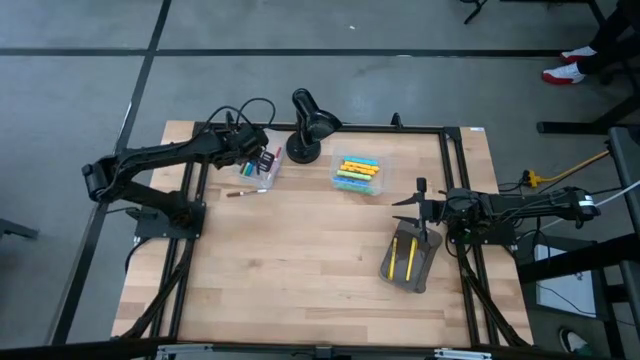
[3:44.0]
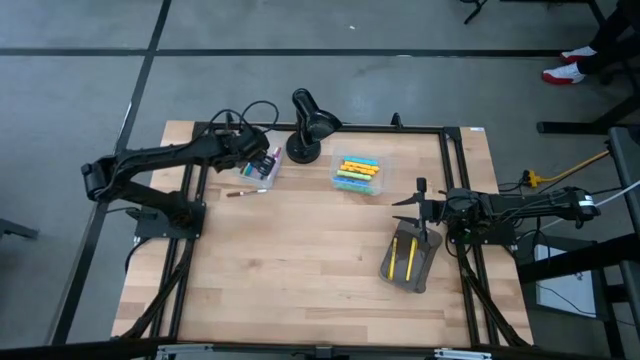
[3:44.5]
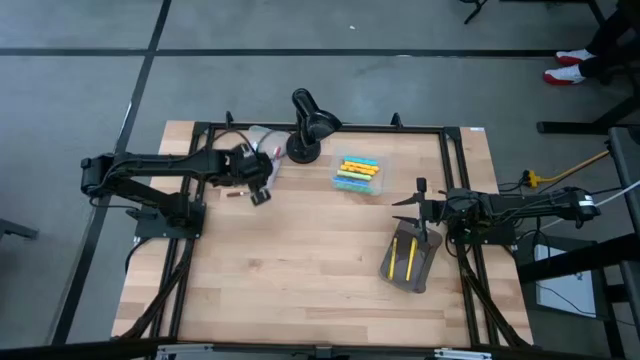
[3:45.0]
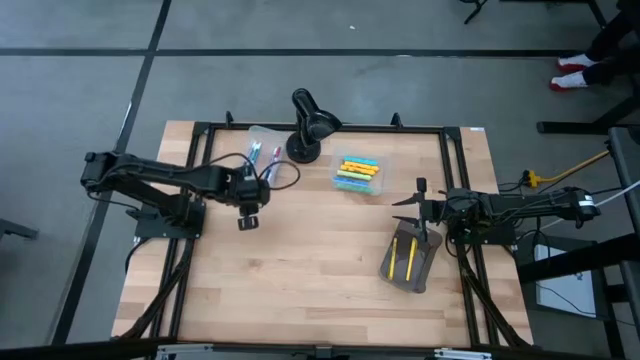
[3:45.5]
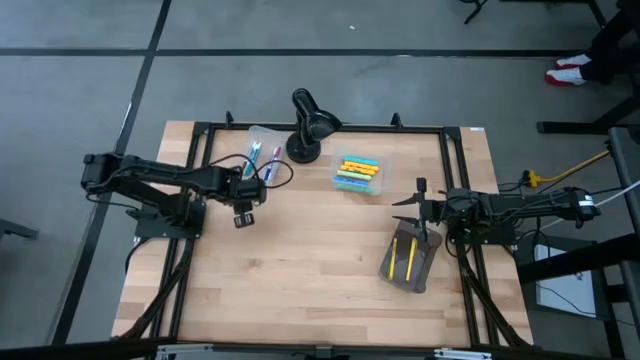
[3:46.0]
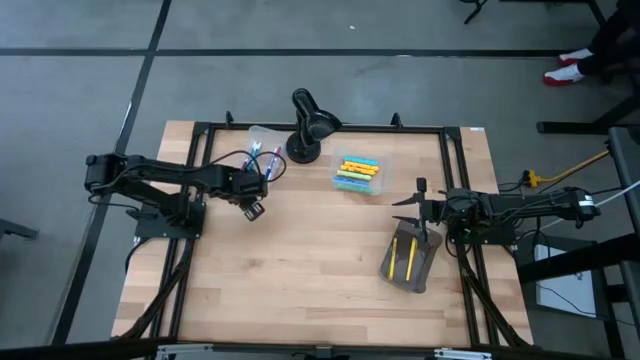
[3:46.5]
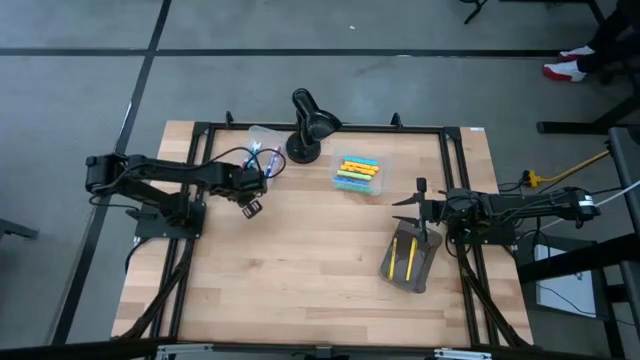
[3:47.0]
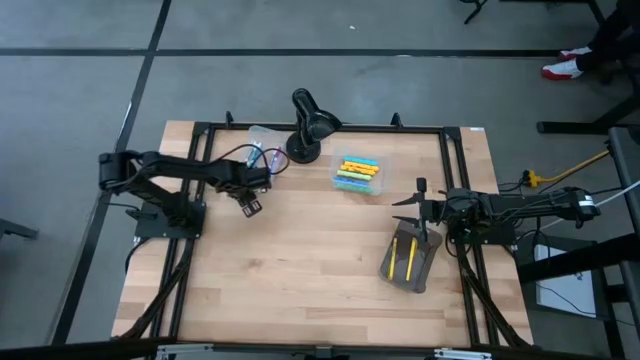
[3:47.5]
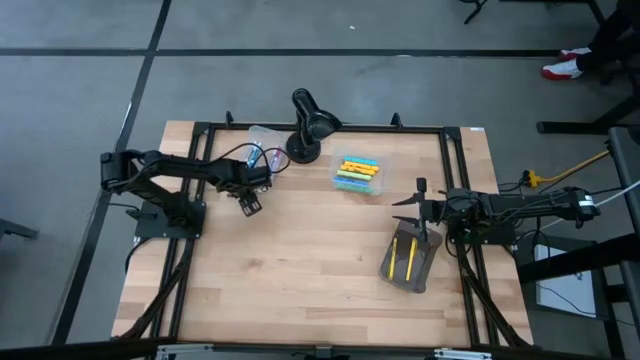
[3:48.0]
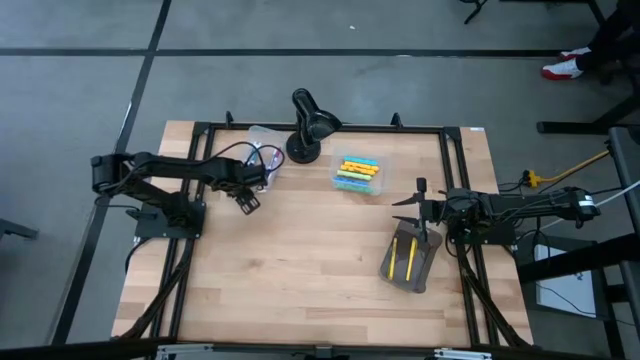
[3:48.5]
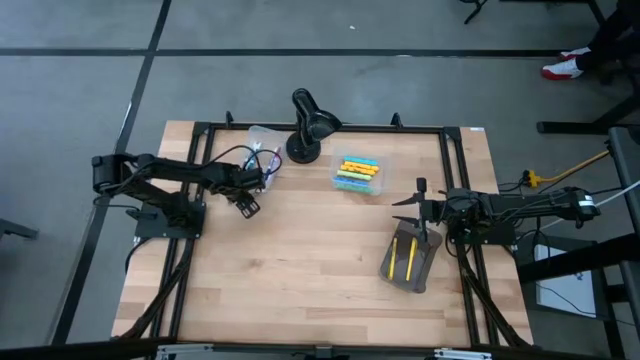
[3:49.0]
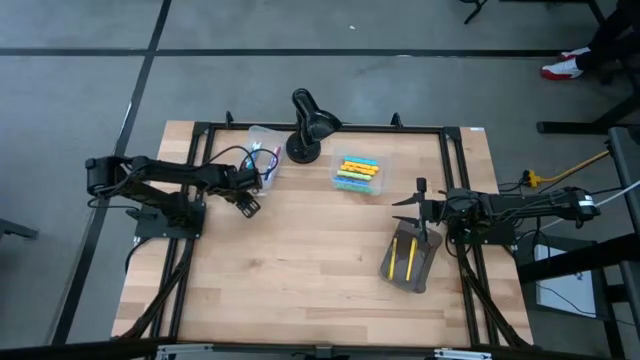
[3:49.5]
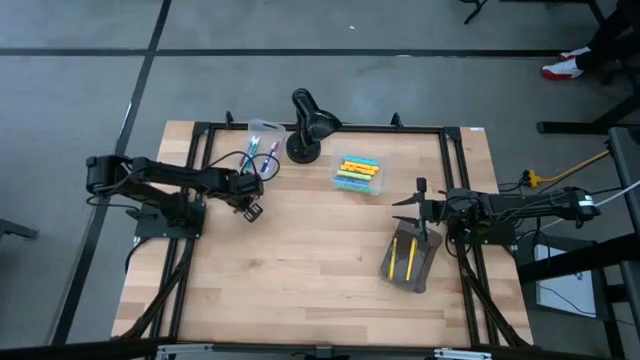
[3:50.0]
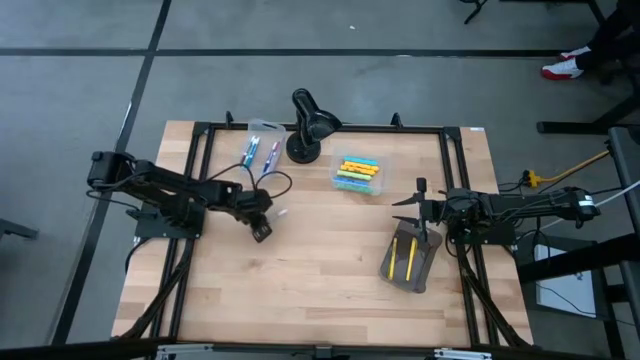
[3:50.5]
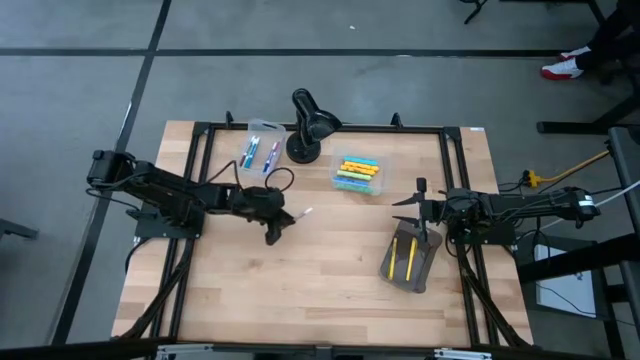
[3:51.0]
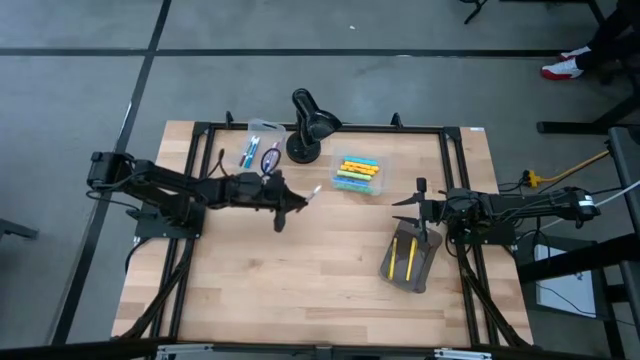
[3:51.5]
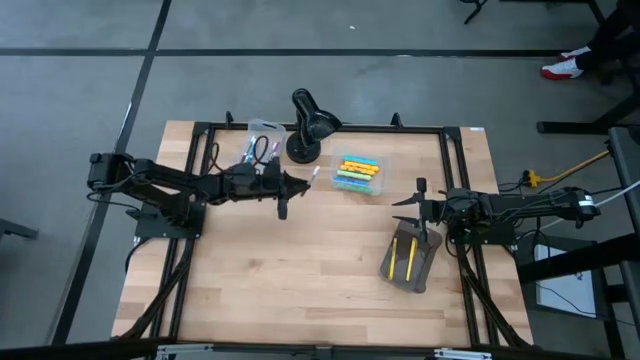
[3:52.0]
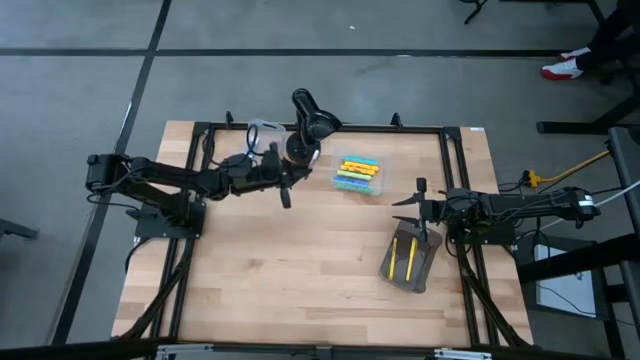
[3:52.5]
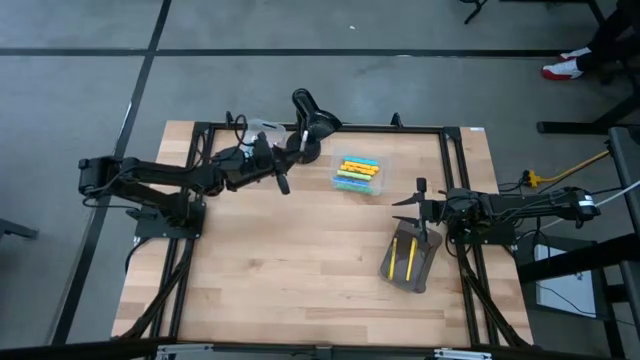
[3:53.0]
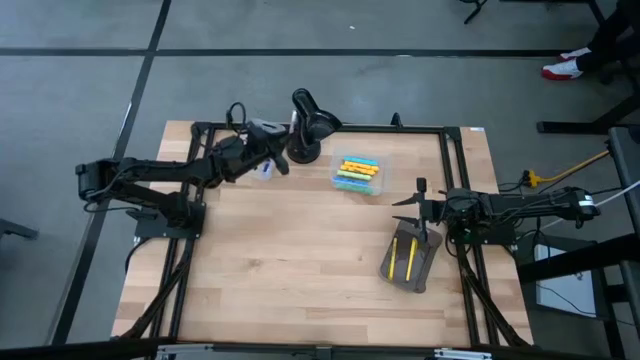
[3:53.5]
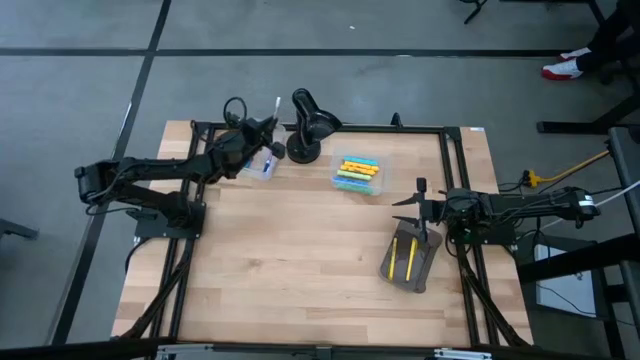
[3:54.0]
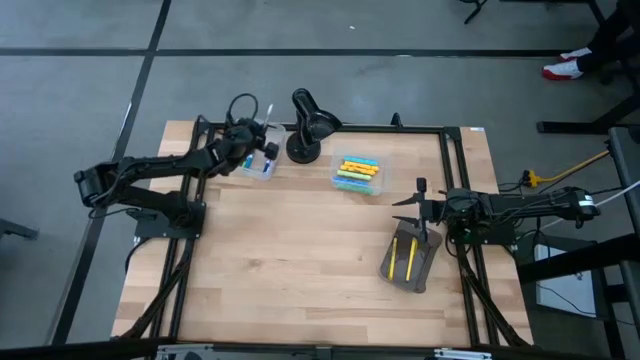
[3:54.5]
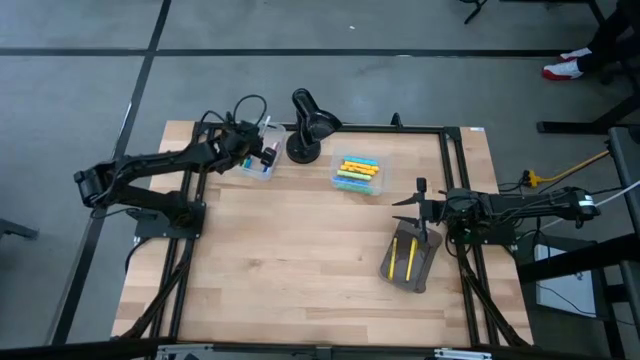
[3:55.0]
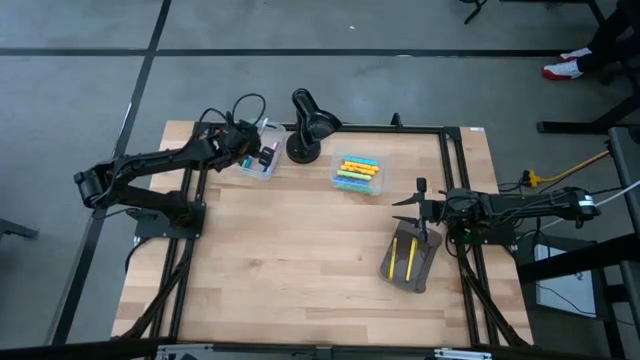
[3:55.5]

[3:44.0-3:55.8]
Task: Pick & Place Markers
Put the brown marker pen into the left transparent bin

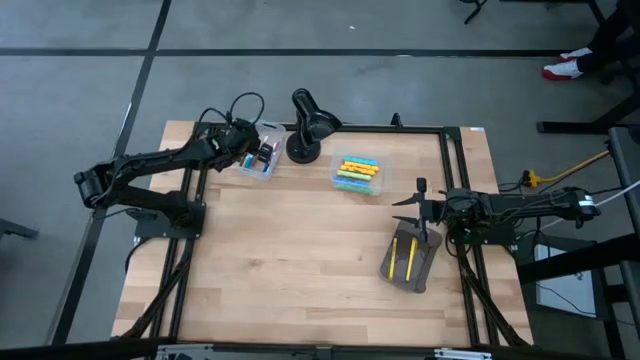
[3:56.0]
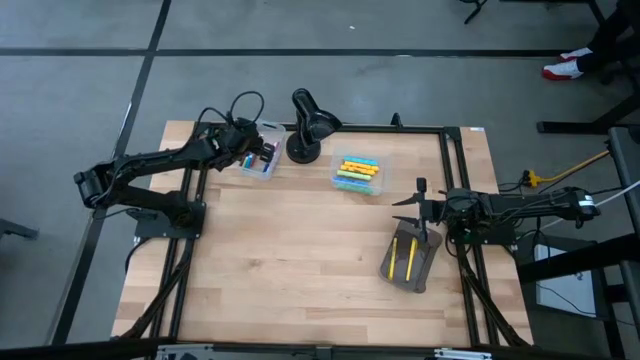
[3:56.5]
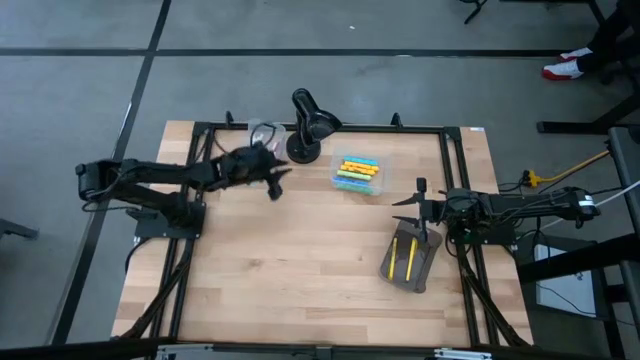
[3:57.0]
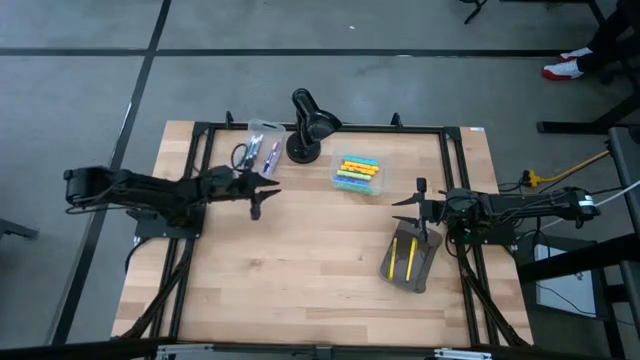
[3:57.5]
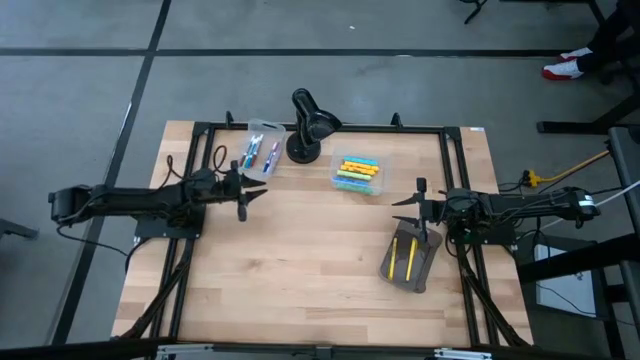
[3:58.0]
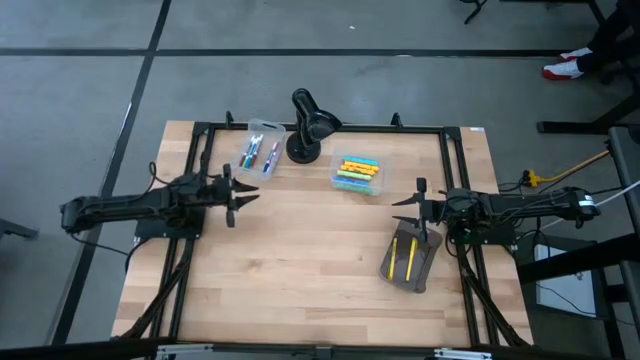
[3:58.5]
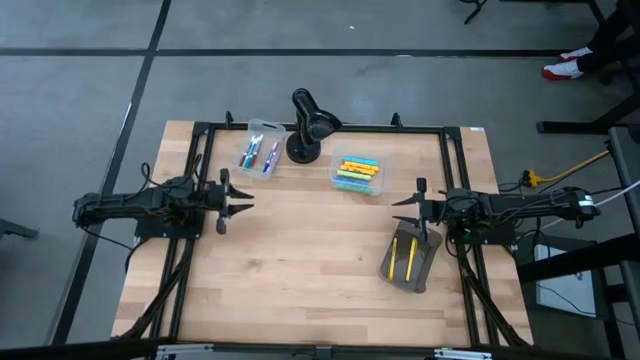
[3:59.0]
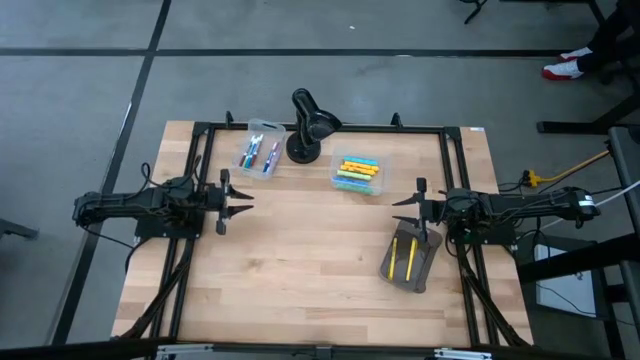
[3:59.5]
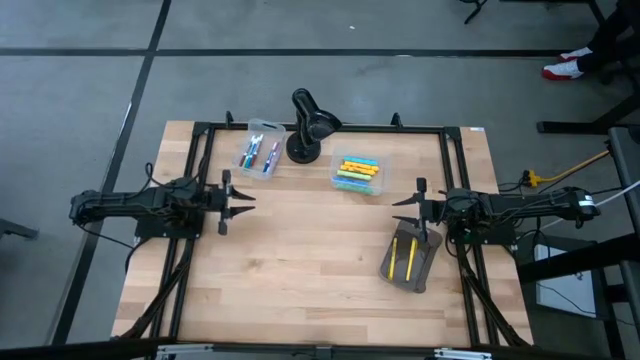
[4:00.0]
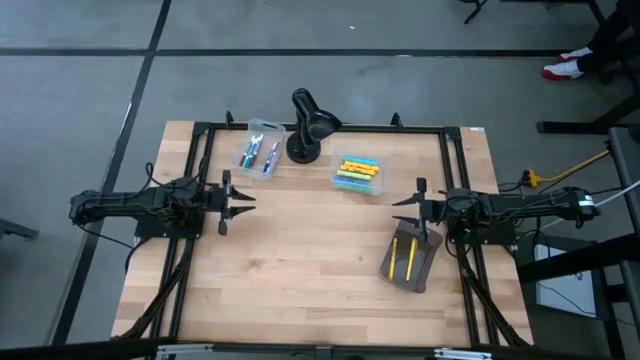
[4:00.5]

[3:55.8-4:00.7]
Return to Home Position

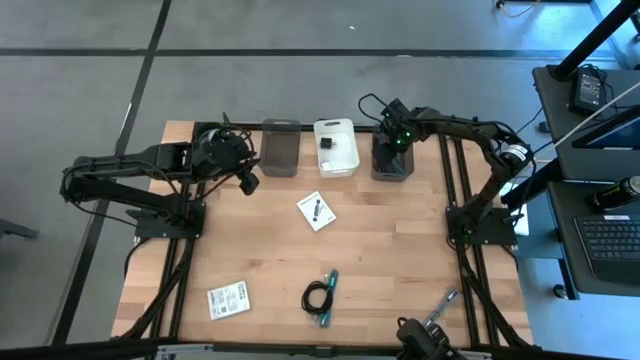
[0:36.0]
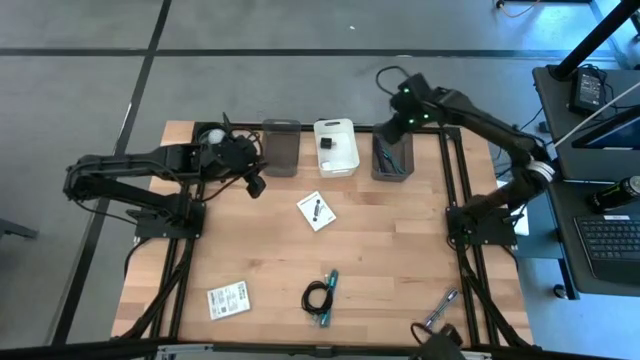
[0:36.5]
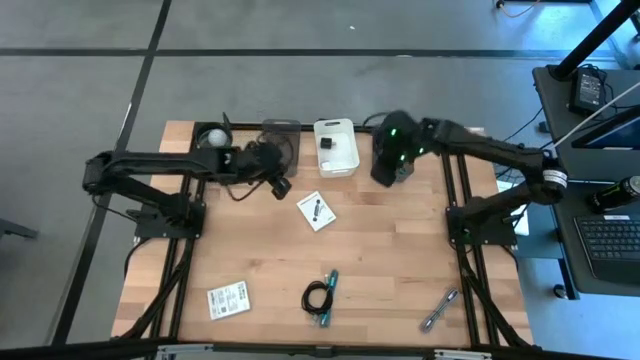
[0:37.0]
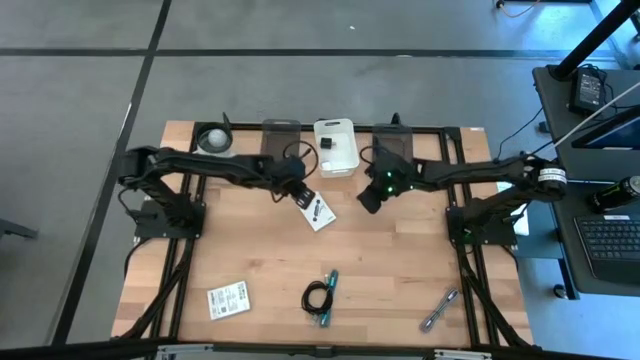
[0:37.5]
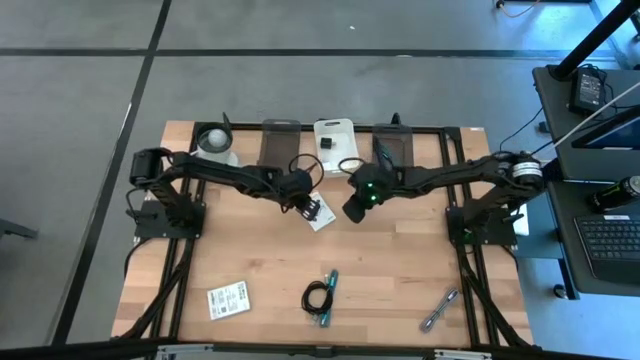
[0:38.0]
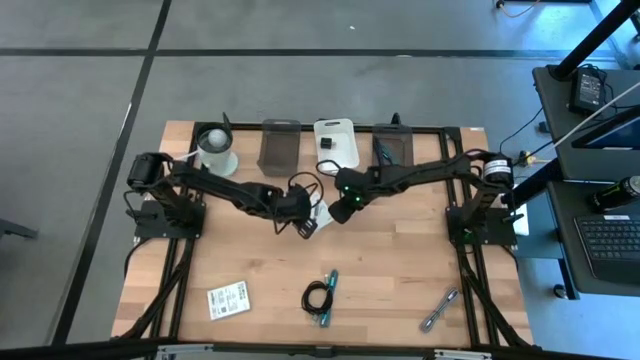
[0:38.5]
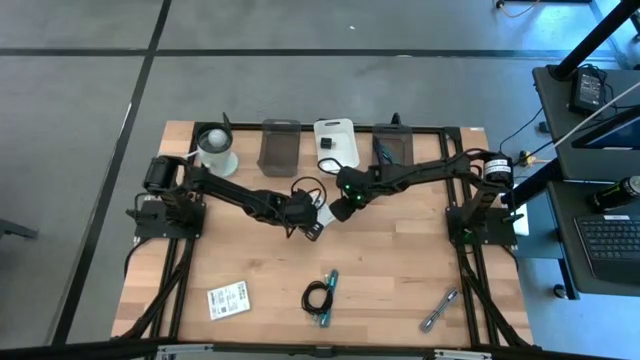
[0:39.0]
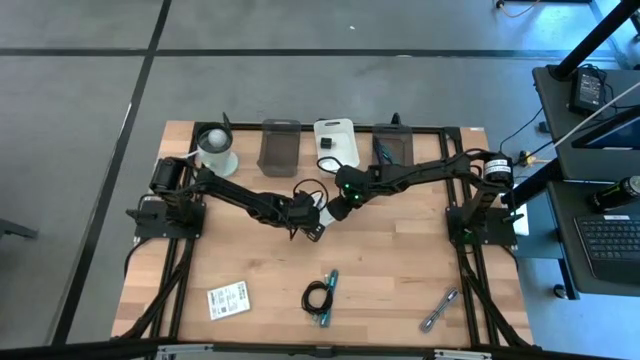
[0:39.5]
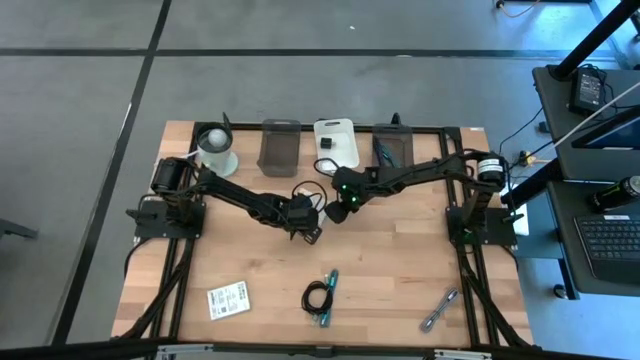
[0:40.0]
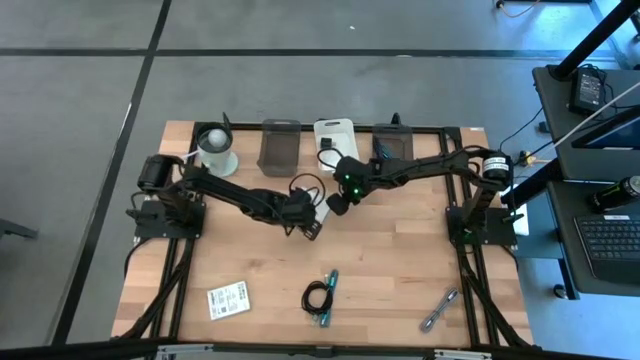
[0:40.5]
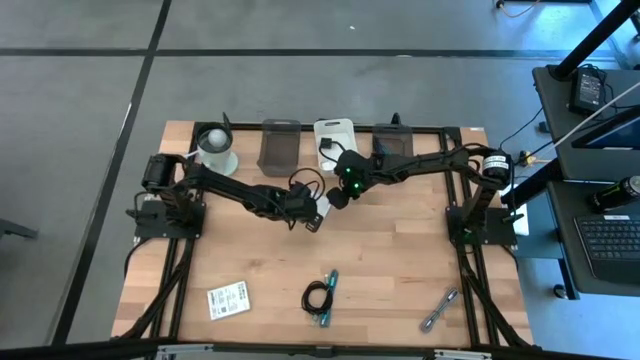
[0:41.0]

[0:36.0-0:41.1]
Task: Pick and place items into bin
Put the card reader box into the left black bin
